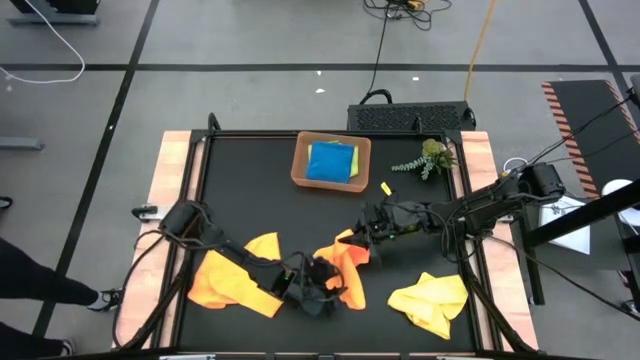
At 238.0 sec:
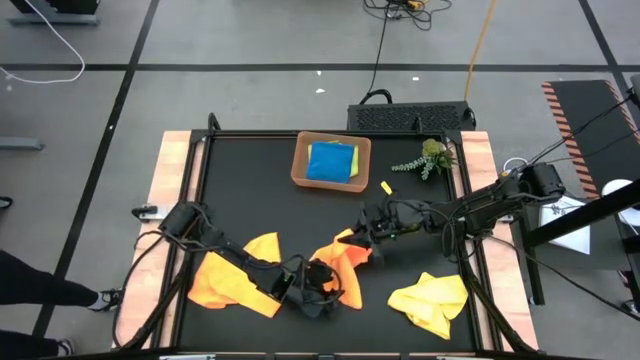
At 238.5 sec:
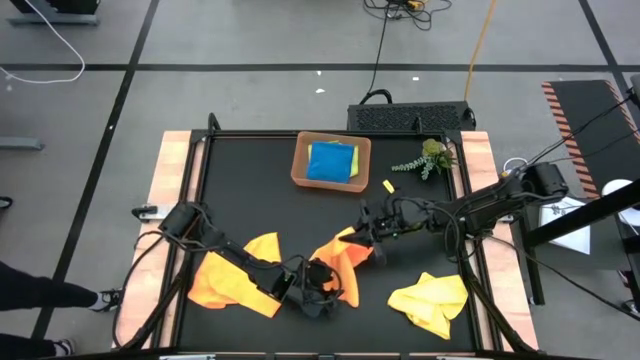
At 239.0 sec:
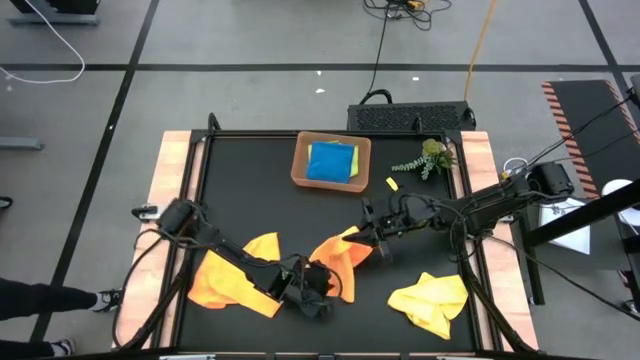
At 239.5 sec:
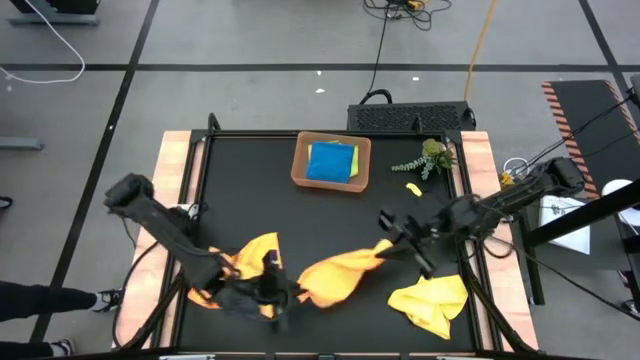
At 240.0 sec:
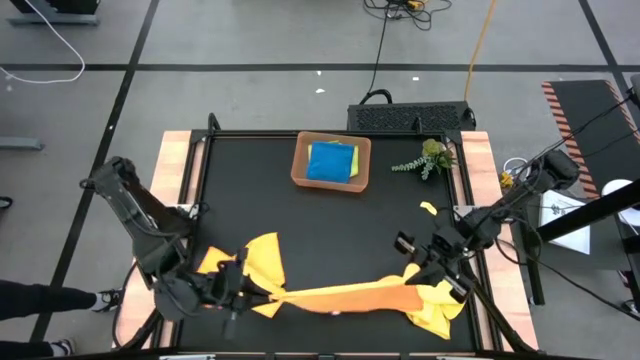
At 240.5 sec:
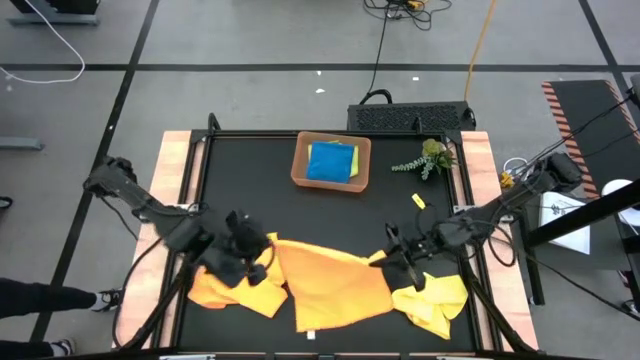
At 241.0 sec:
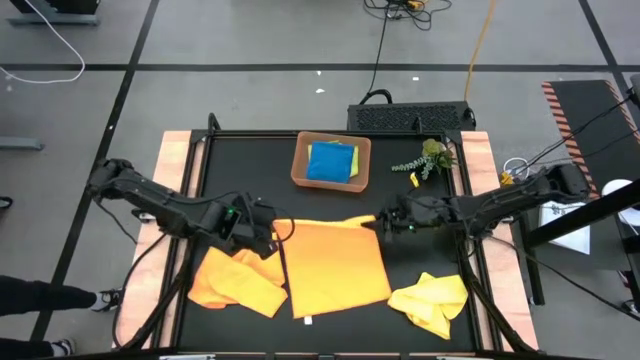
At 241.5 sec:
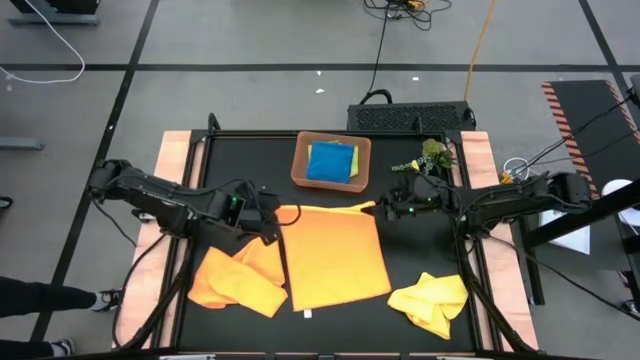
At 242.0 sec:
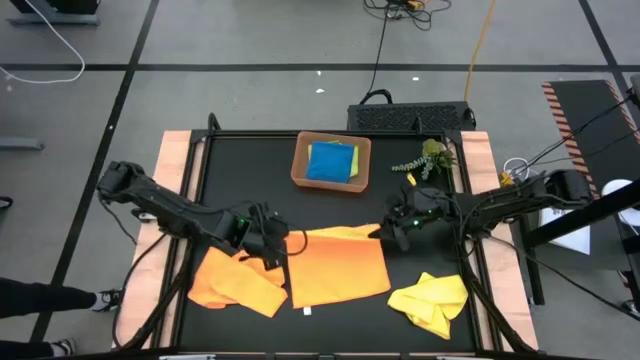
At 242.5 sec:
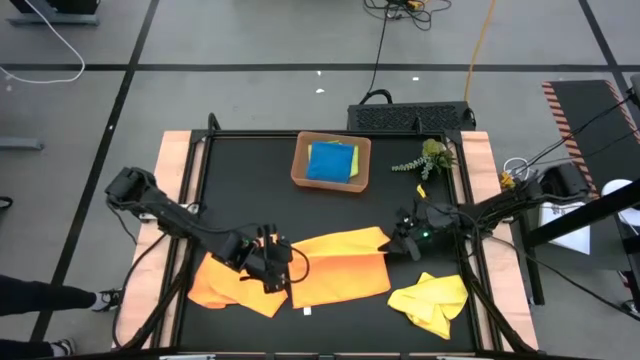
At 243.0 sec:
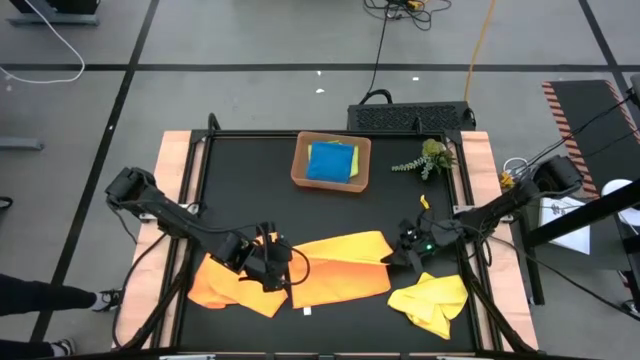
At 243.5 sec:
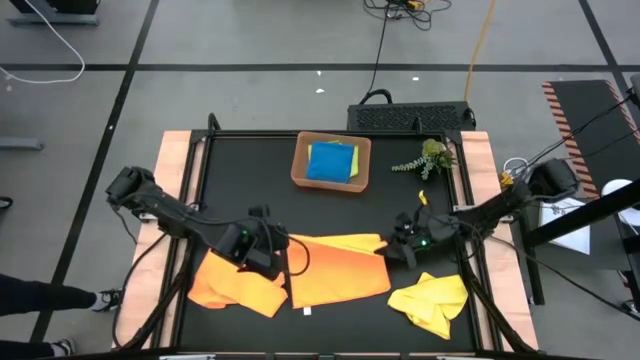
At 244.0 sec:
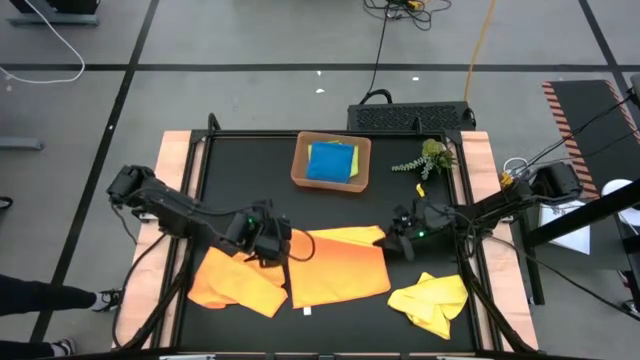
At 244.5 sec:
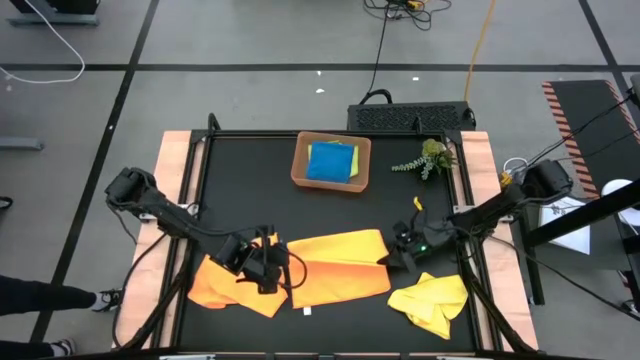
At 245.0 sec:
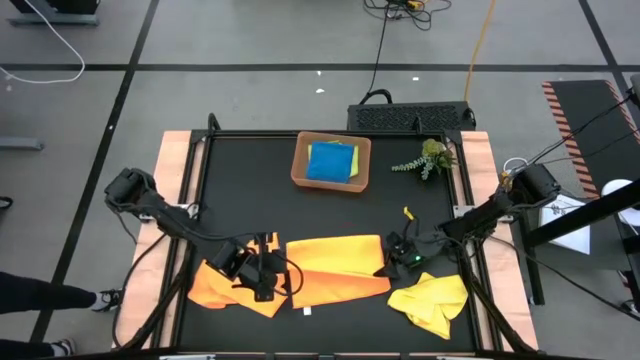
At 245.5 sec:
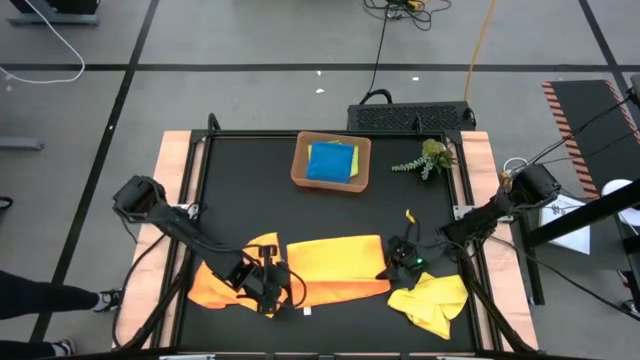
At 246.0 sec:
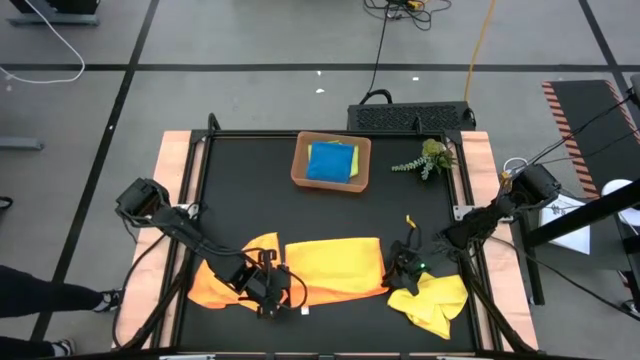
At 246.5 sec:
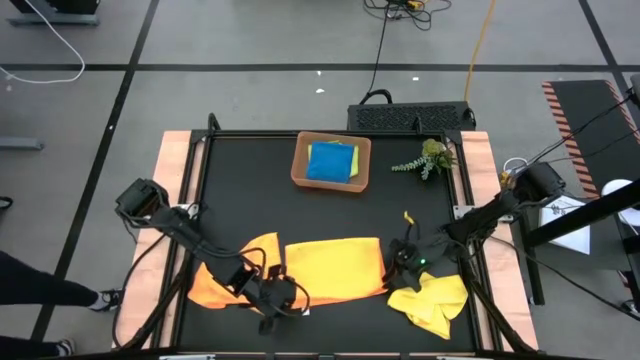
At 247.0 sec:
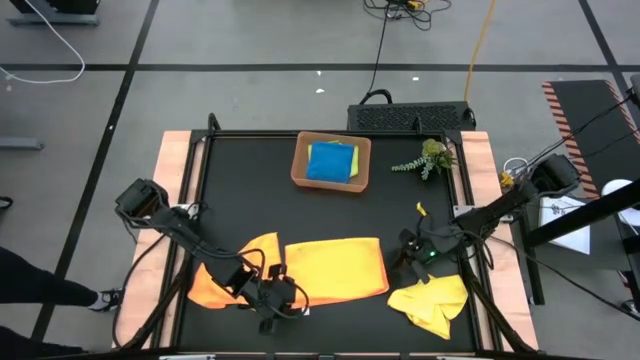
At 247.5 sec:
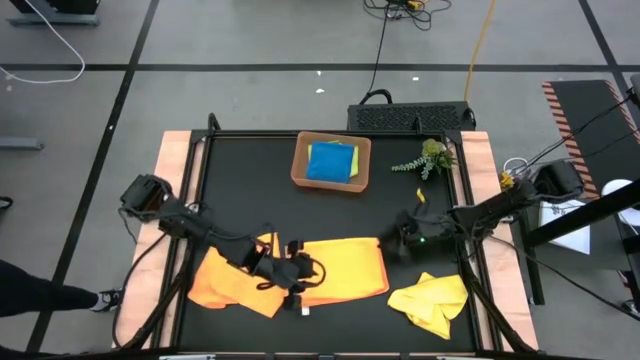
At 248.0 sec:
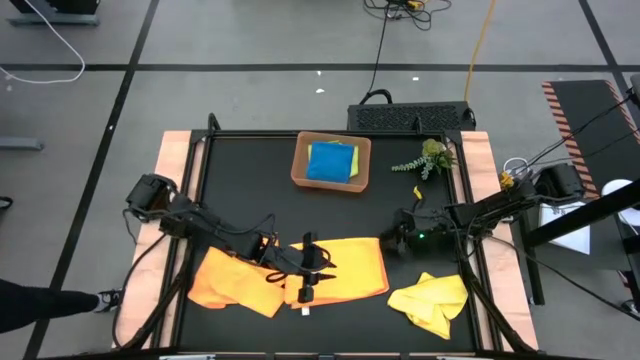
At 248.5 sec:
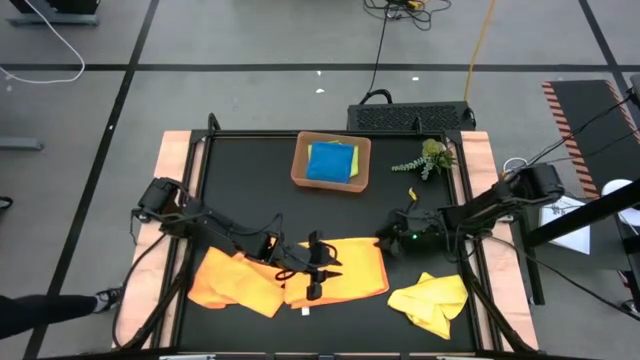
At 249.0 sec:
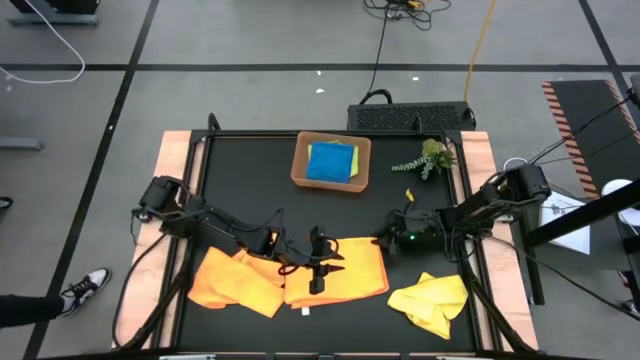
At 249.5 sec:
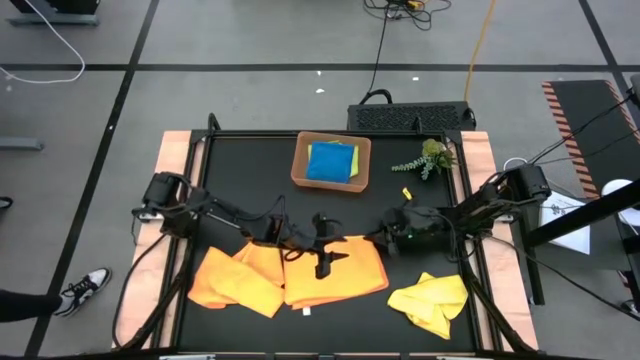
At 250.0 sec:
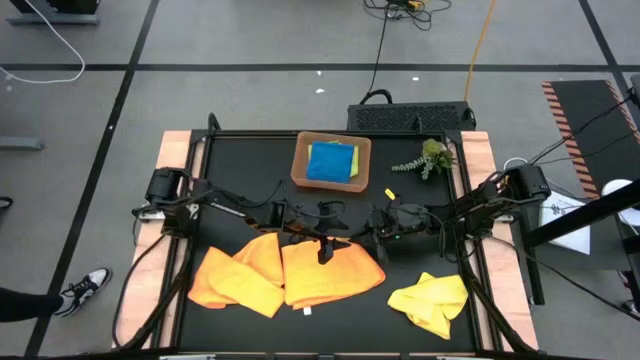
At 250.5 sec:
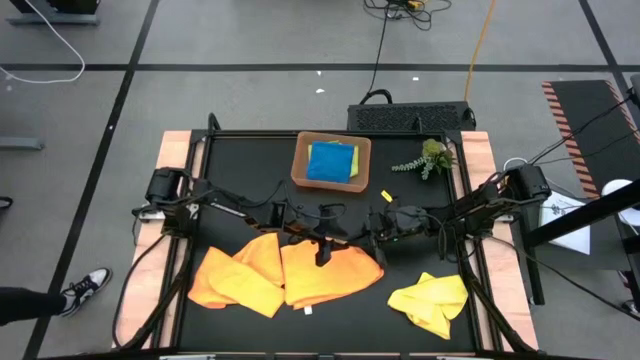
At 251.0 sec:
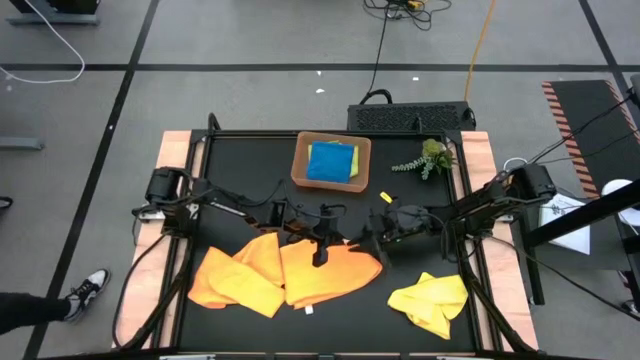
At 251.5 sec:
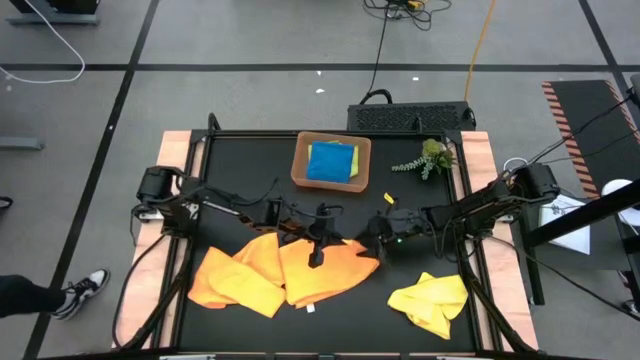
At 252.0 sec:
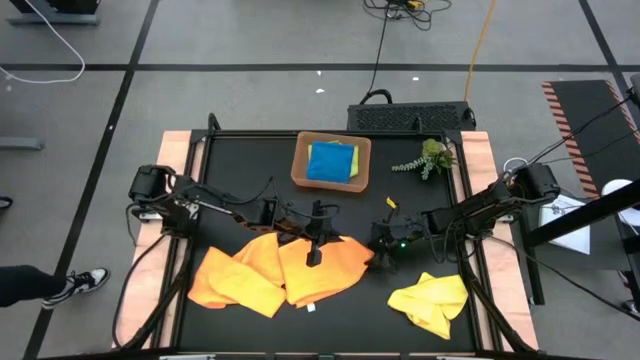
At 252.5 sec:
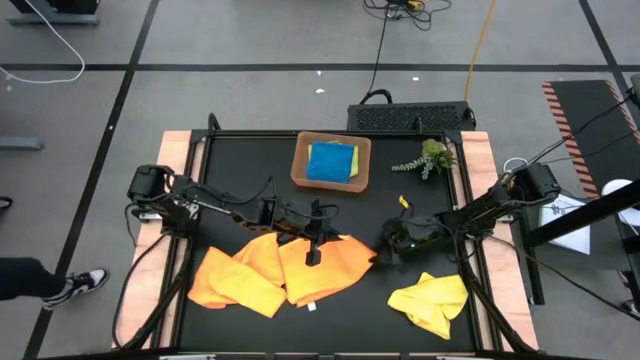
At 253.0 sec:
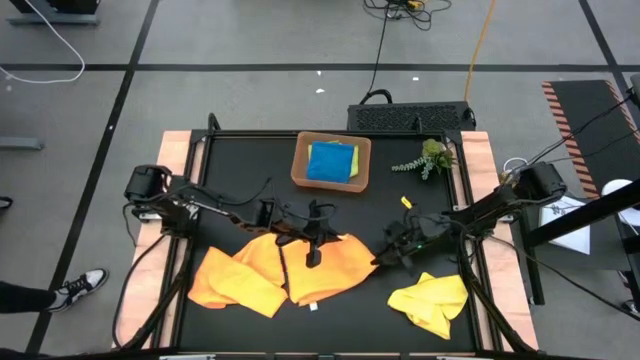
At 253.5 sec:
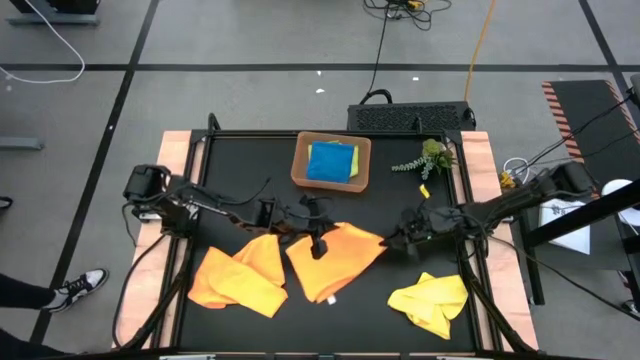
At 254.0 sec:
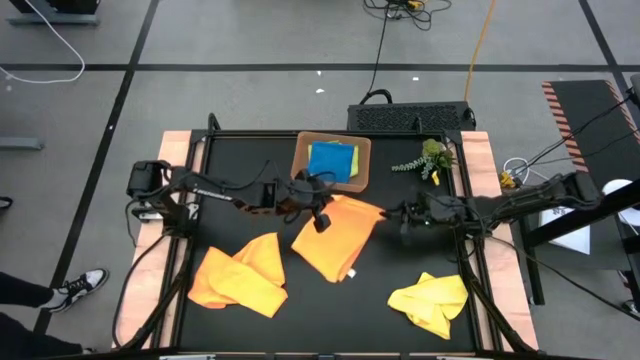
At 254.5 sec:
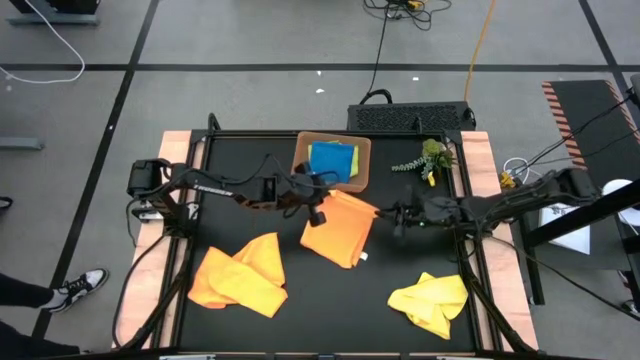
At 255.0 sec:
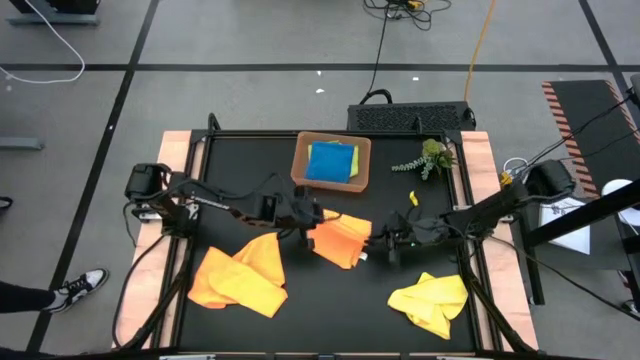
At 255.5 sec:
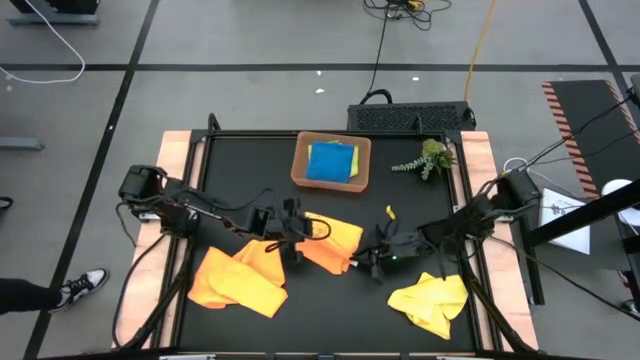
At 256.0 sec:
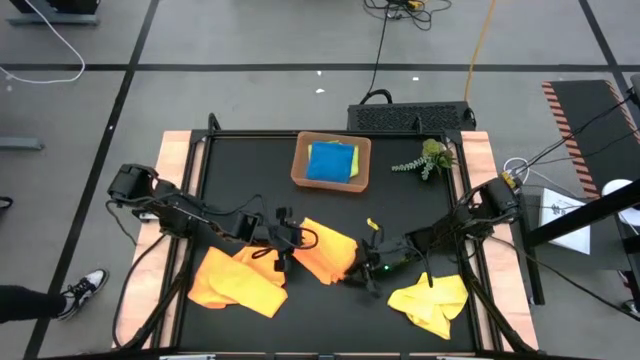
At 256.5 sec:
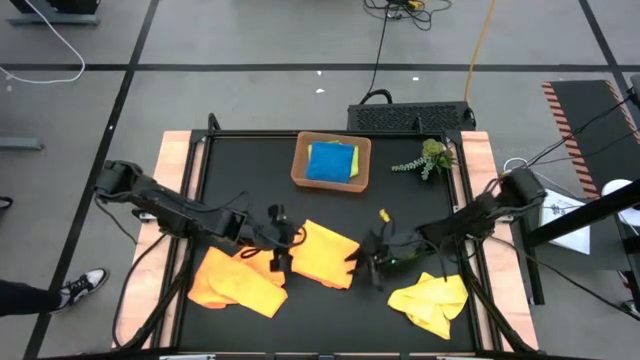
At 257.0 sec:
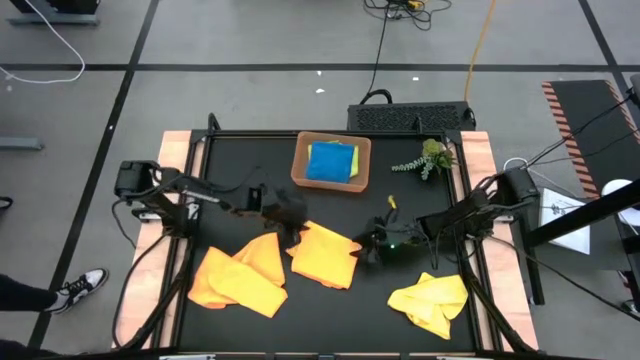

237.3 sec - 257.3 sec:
Task: Fold microfiber towels
Fold the orange microfiber towel

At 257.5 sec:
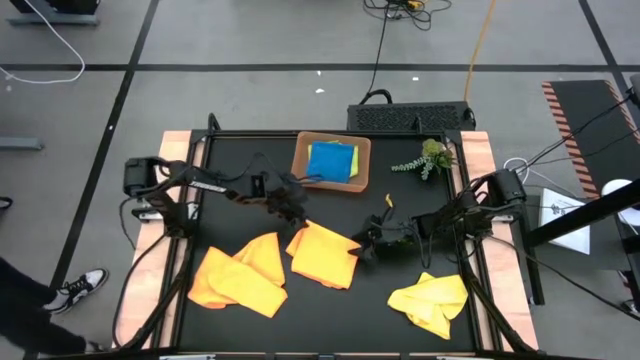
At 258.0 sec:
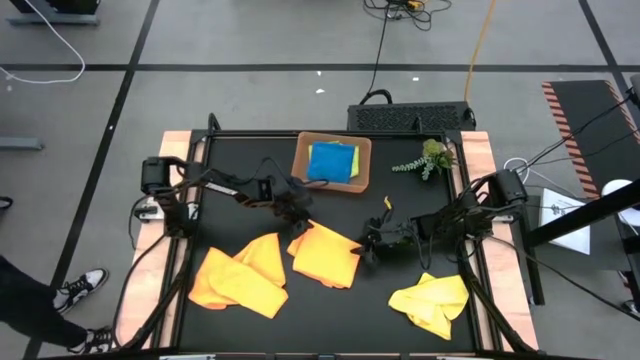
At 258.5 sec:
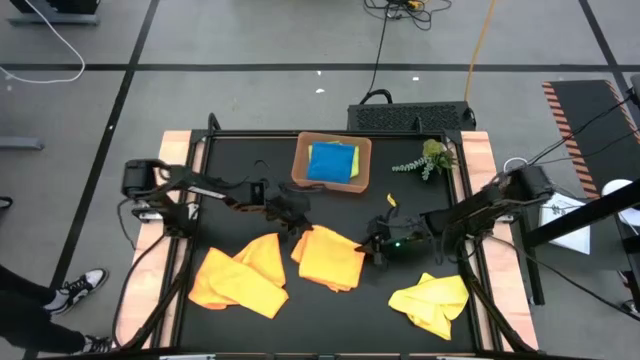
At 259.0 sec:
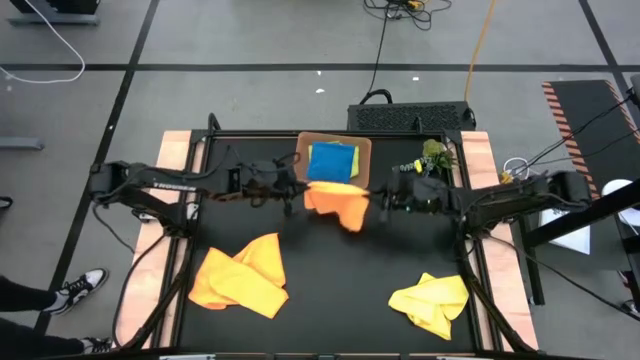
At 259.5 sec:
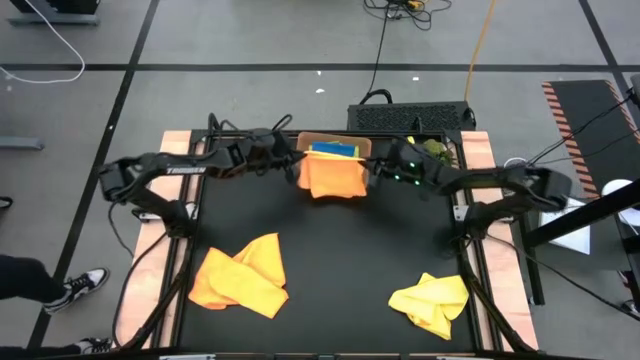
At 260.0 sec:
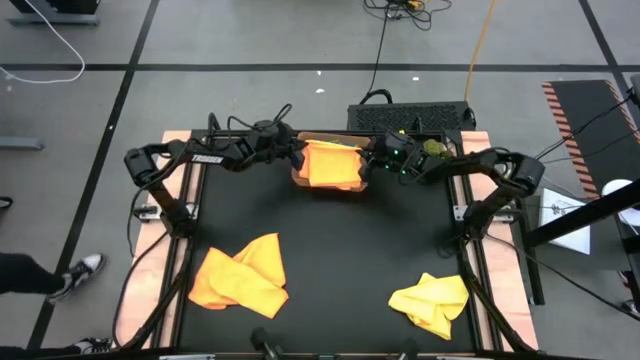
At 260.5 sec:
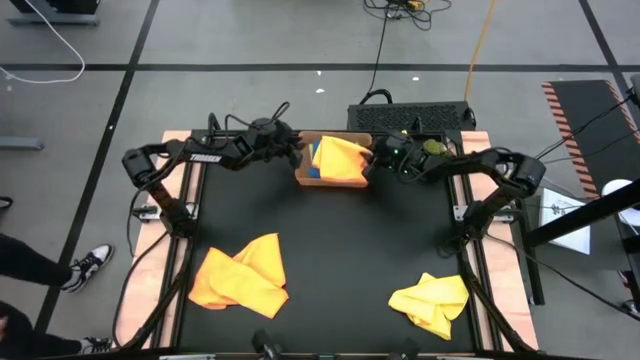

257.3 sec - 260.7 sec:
Put the orange microfiber towel into the orange bin
